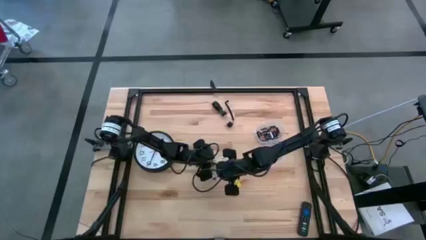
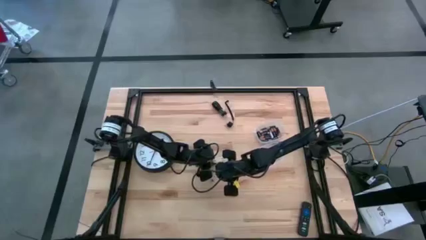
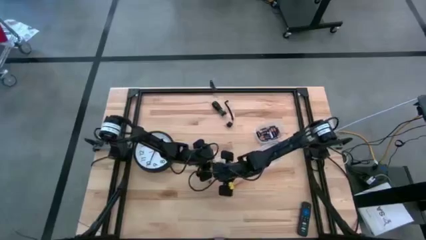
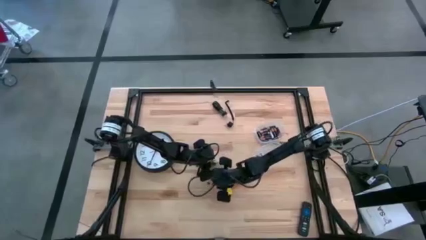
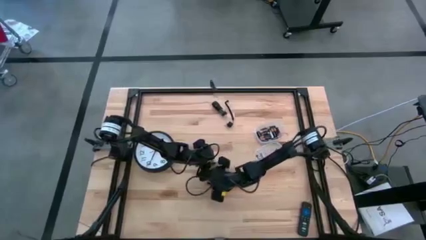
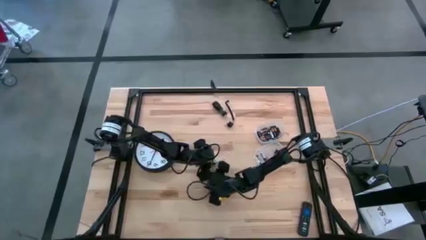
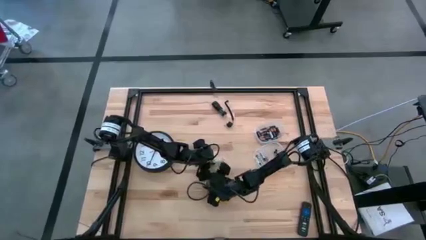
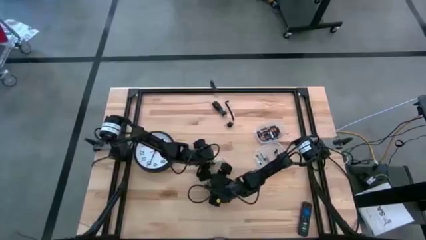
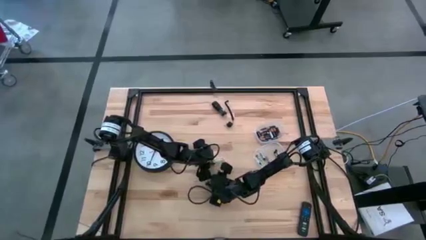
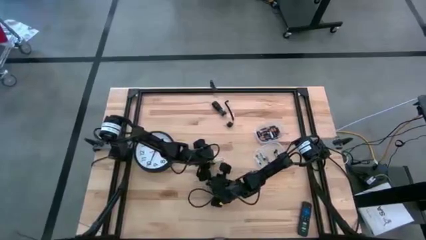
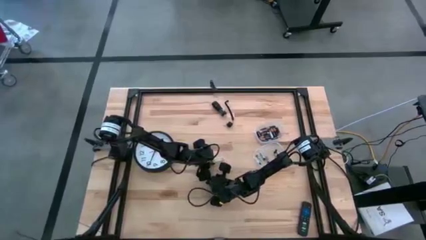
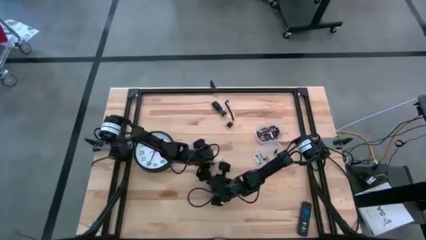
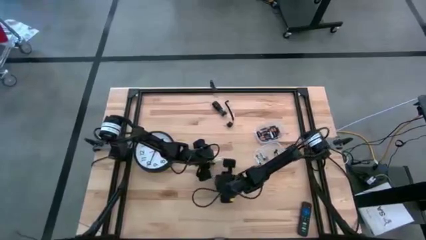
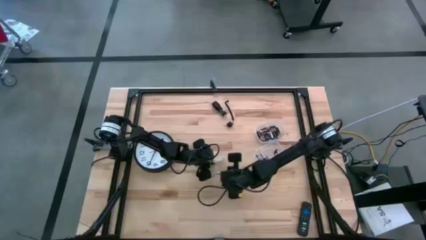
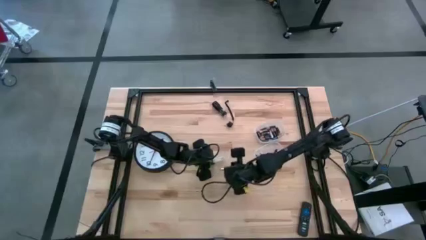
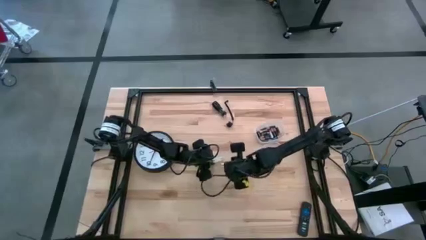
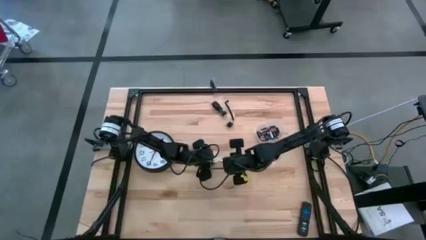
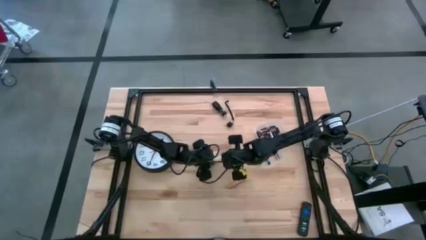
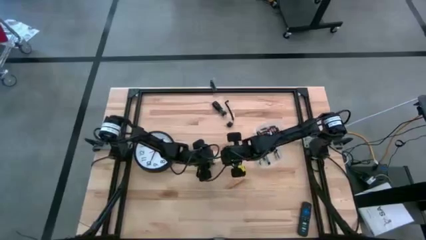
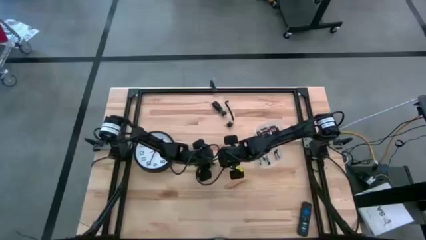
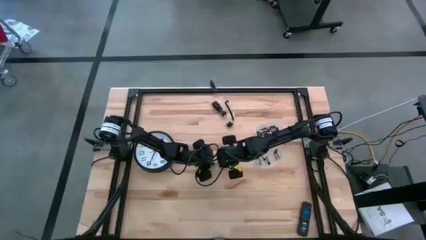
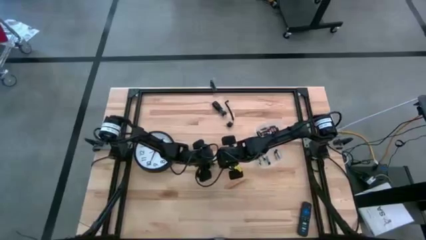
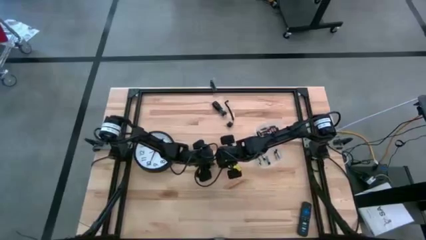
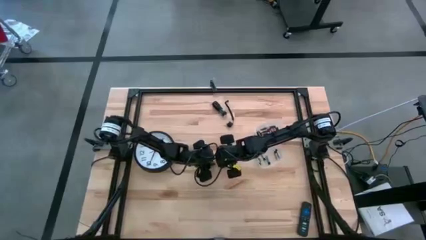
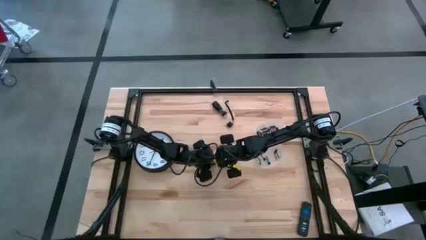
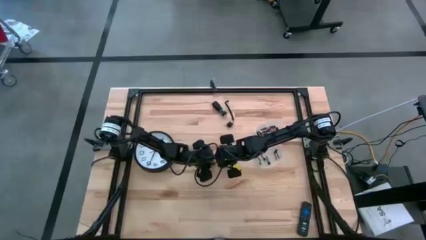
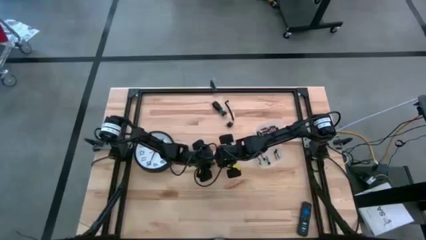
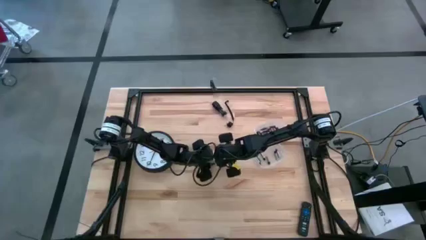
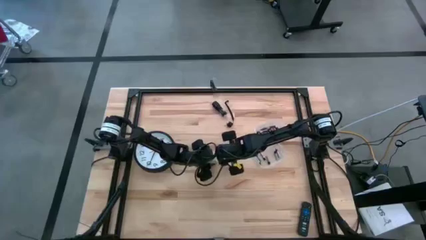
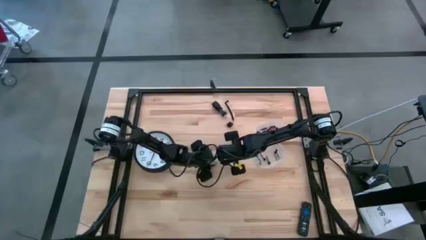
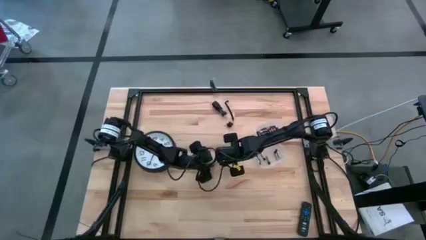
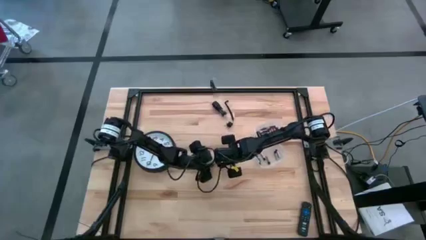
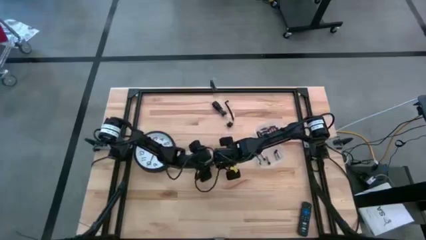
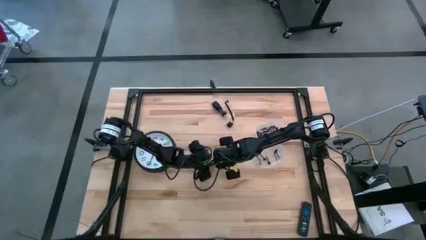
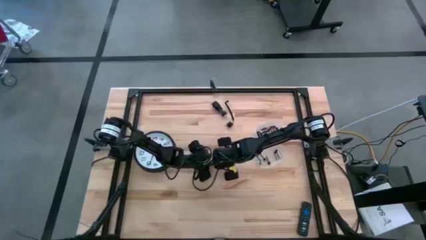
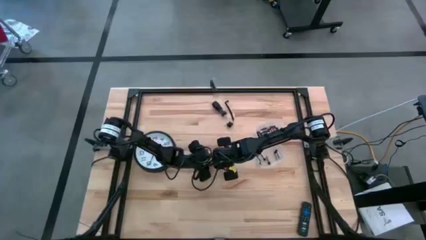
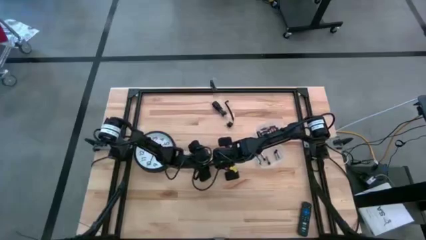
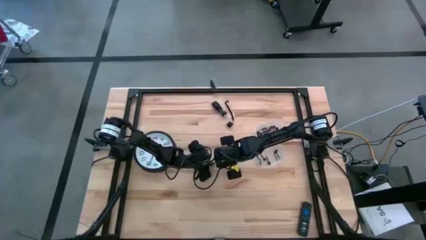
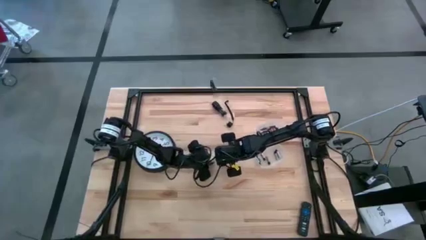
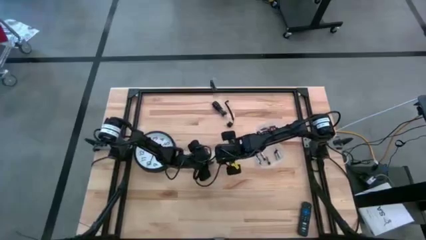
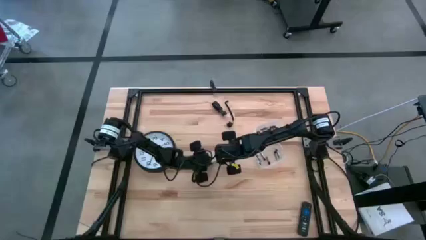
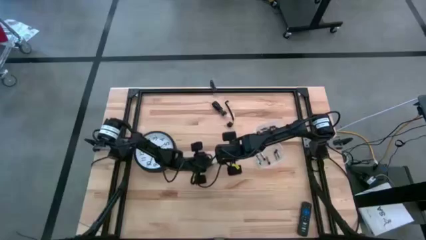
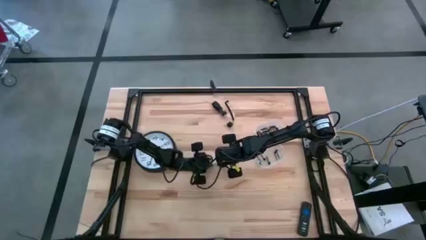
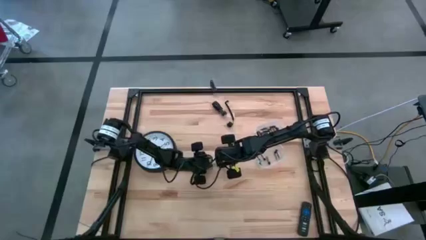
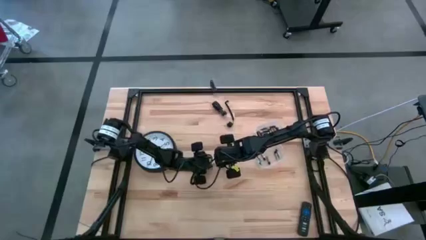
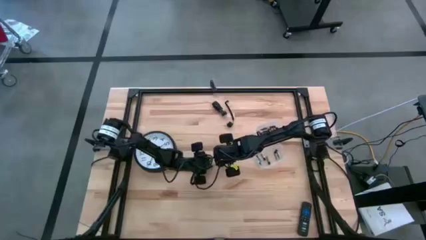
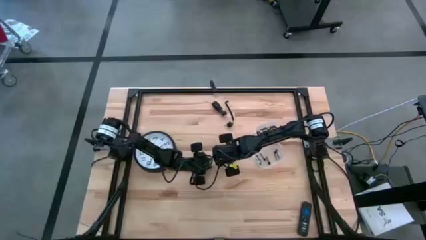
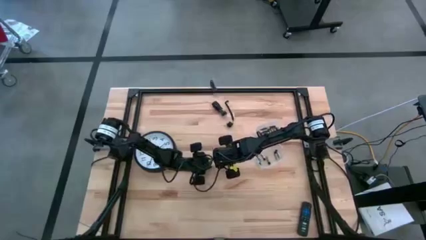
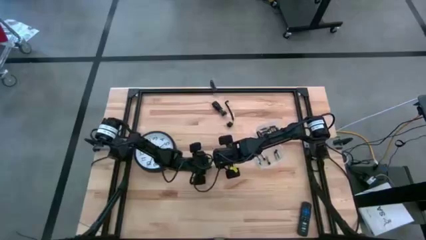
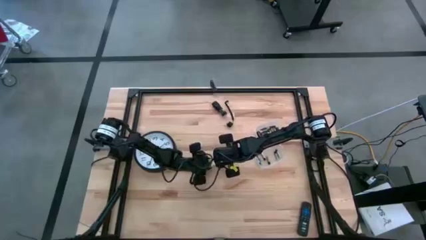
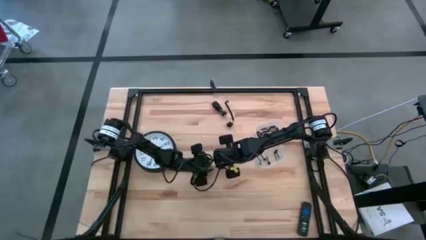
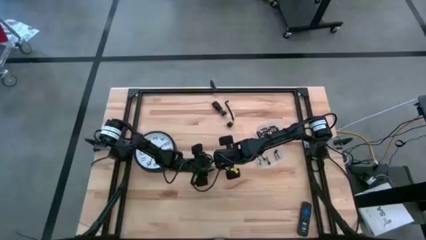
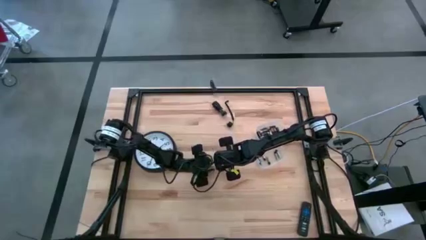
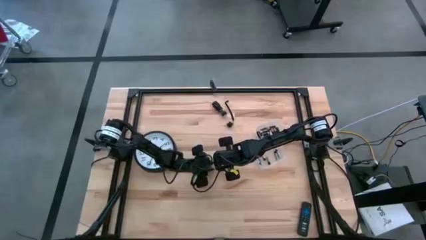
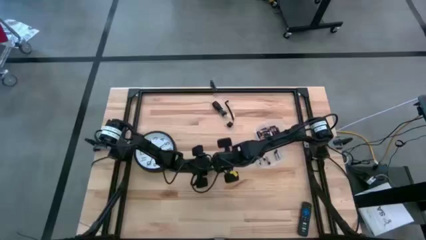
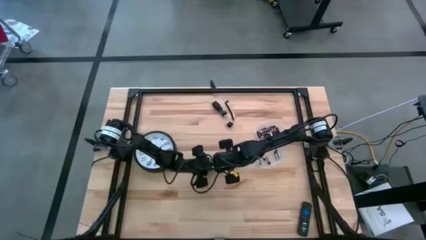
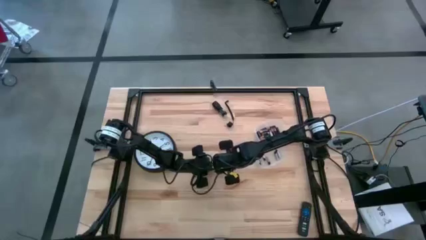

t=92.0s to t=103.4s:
Task: Insert battery
Insert the silver battery into the white flashlight battery holder

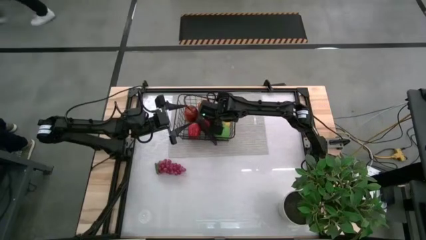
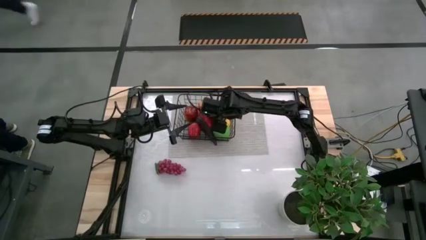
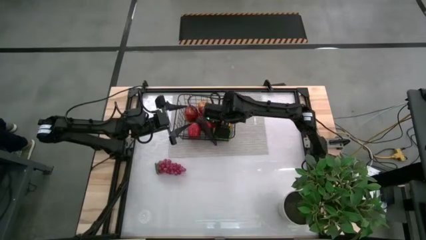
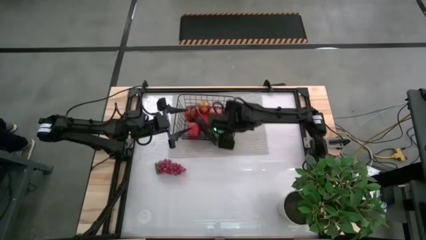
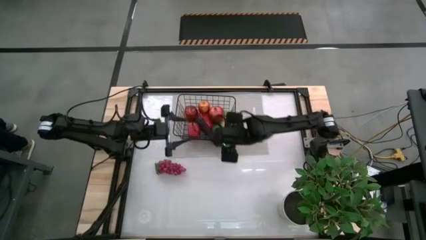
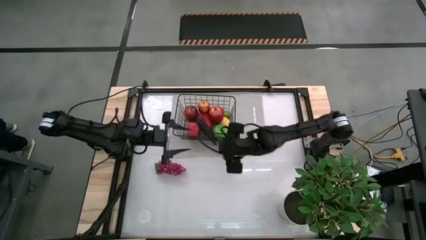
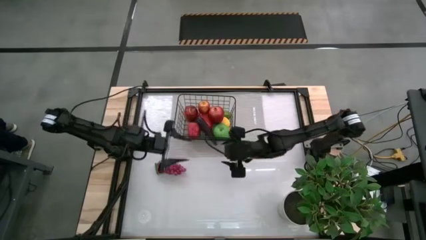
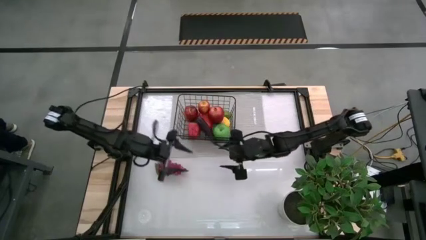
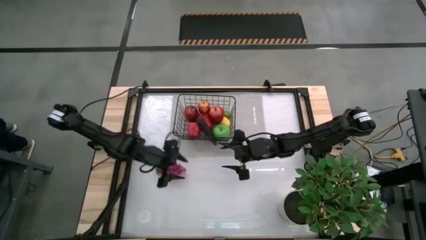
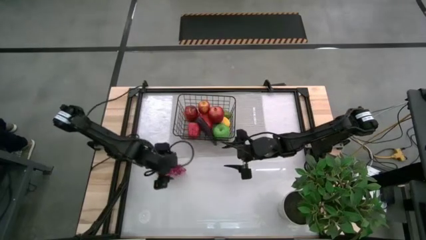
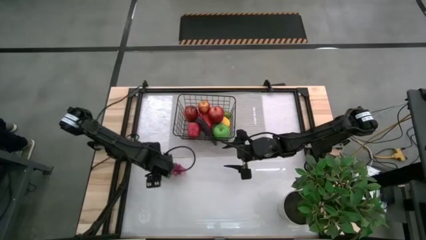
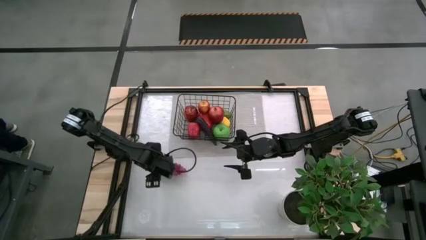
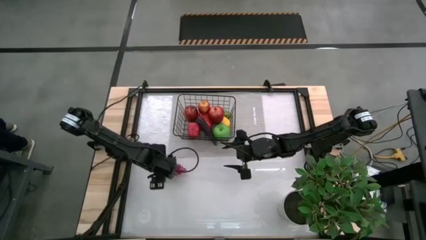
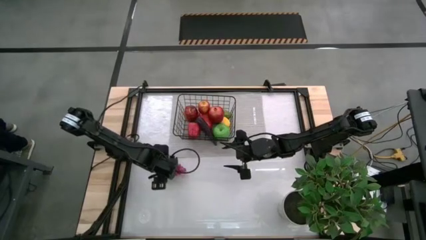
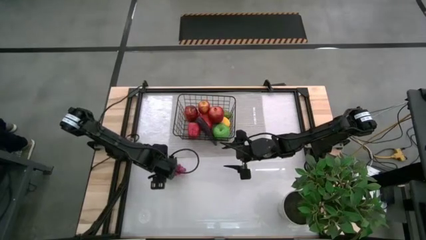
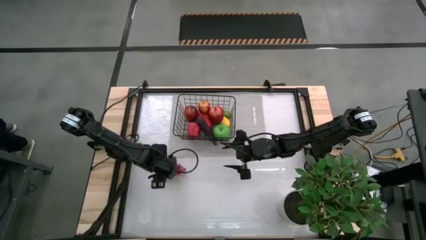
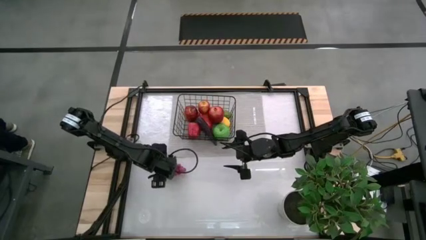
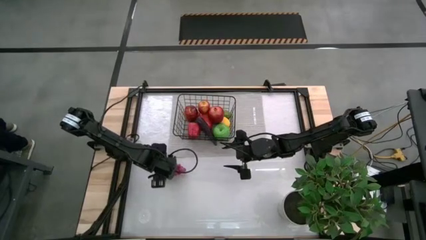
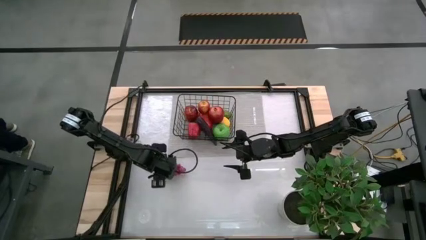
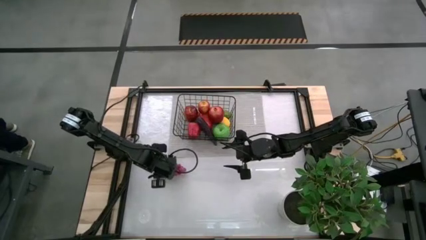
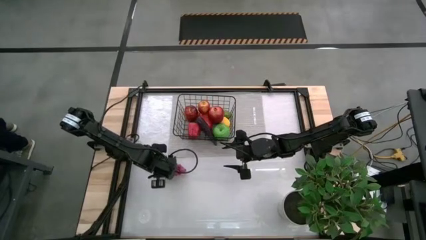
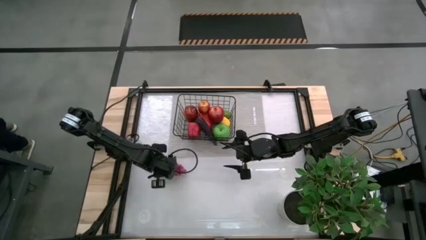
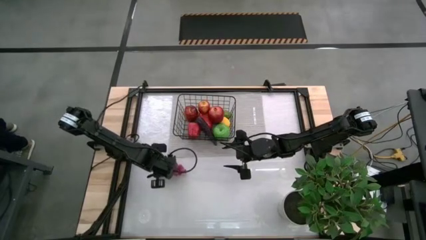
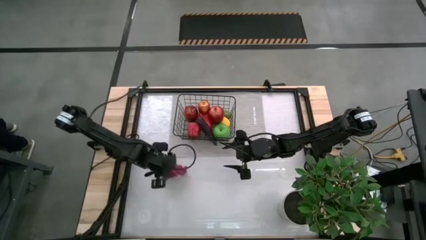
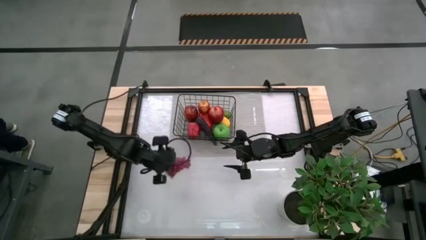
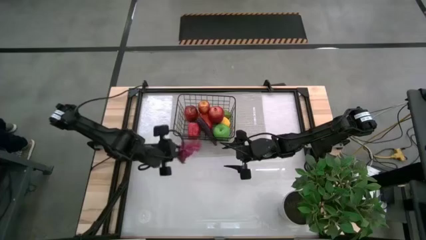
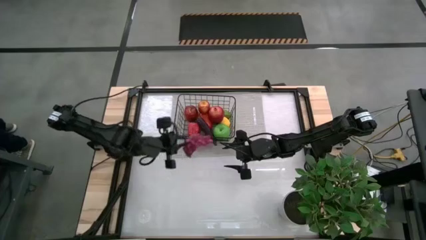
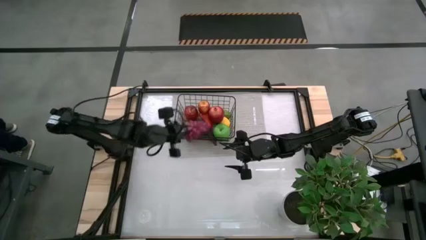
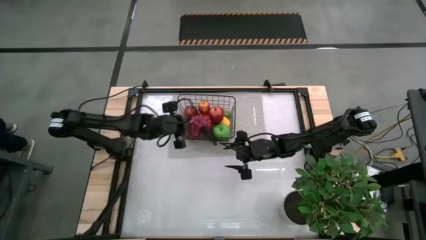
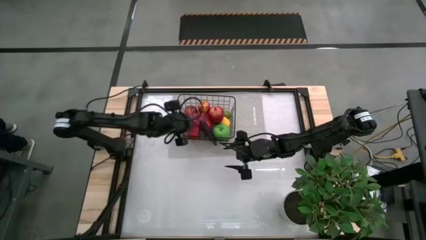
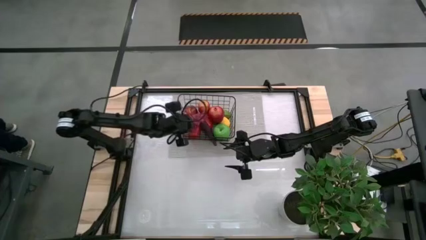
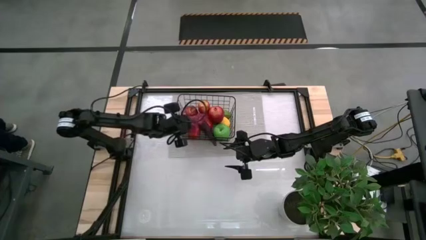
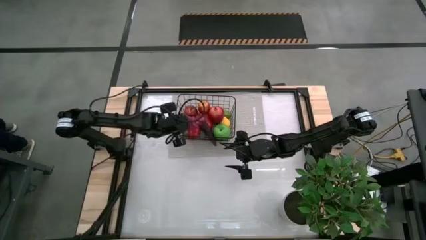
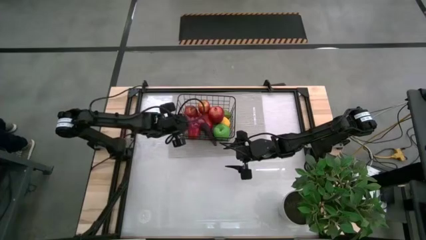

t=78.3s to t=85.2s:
Task: Build produce basket
Put the grapes into the wire basket
